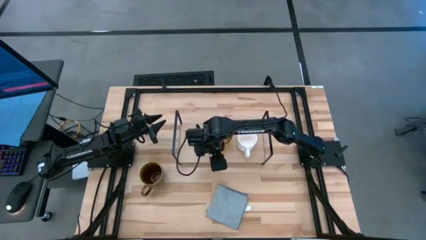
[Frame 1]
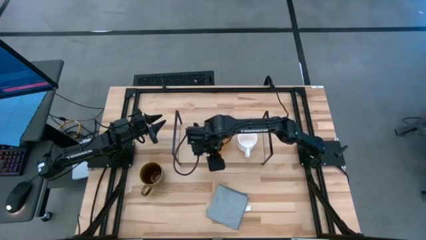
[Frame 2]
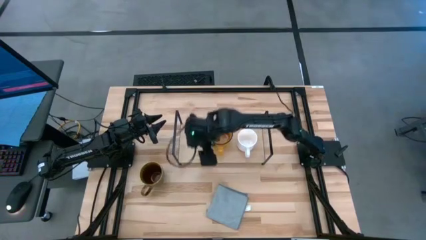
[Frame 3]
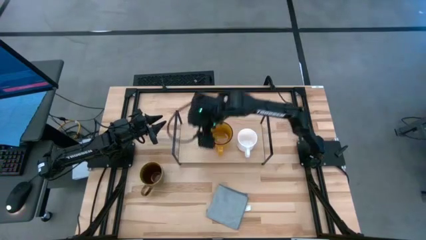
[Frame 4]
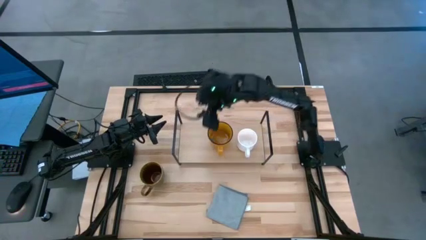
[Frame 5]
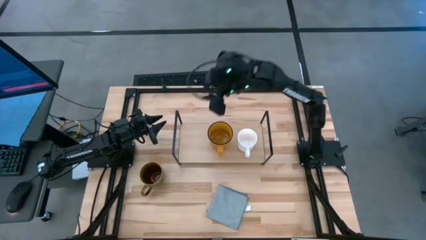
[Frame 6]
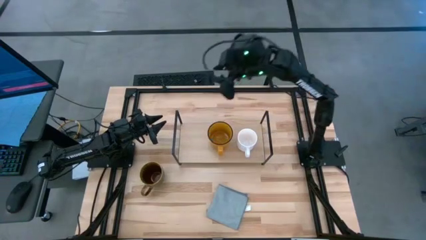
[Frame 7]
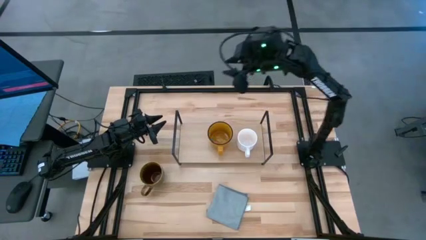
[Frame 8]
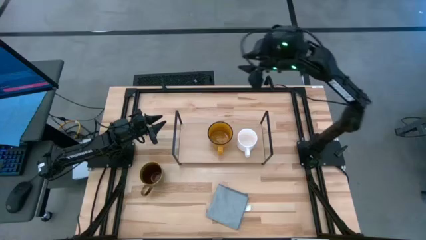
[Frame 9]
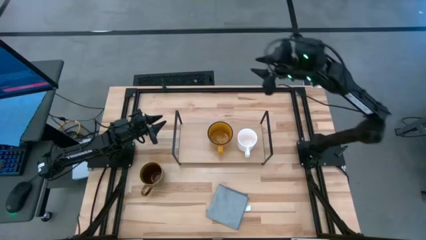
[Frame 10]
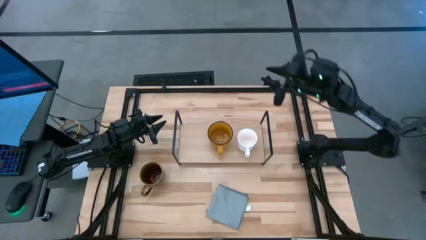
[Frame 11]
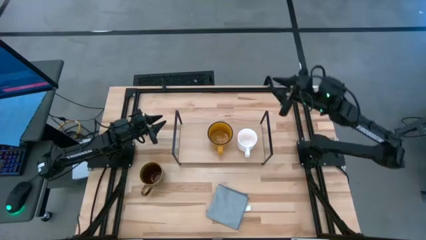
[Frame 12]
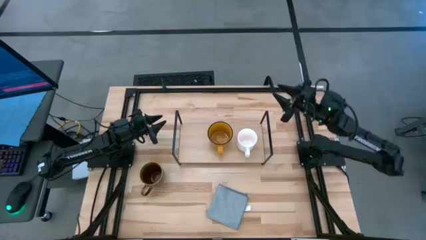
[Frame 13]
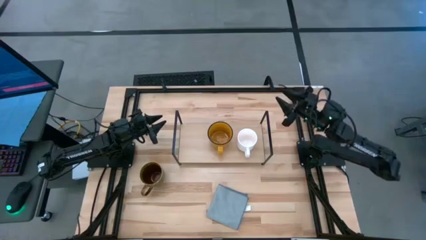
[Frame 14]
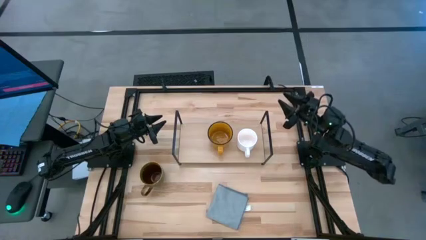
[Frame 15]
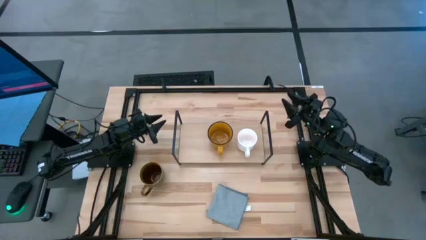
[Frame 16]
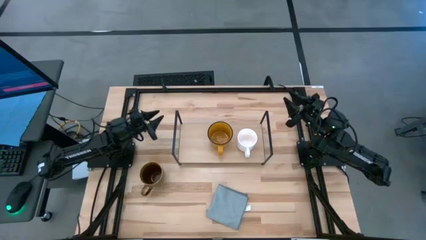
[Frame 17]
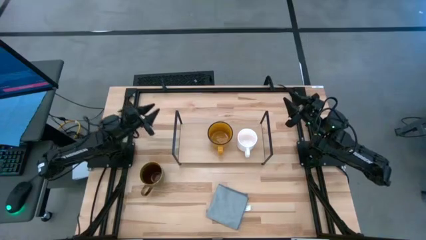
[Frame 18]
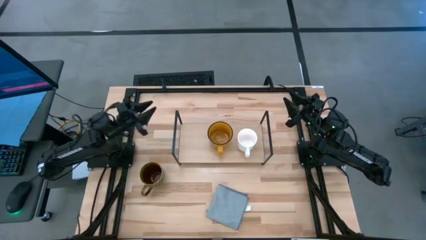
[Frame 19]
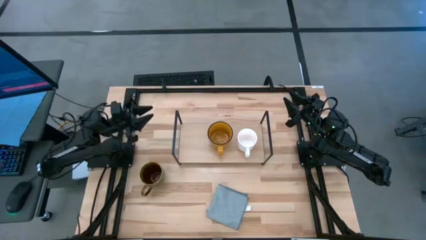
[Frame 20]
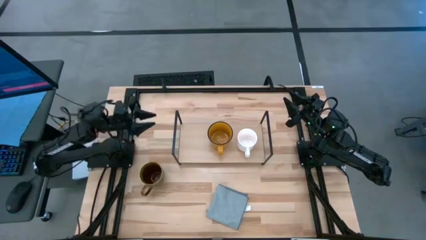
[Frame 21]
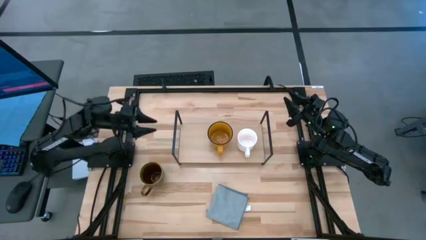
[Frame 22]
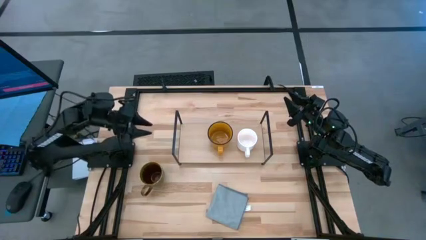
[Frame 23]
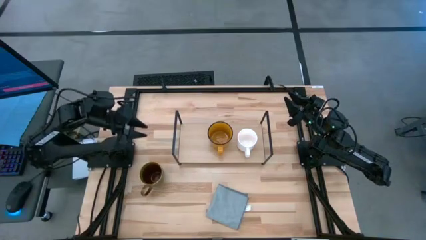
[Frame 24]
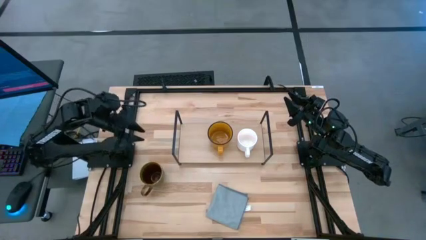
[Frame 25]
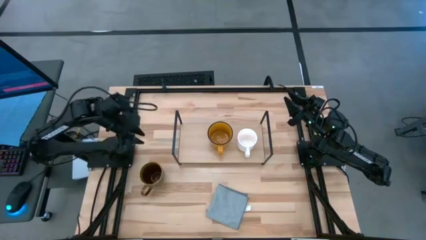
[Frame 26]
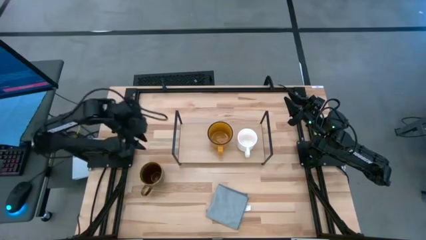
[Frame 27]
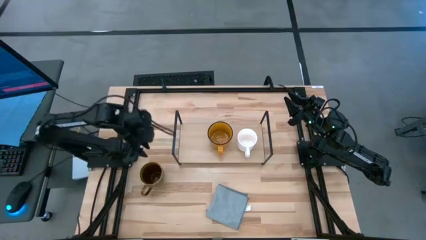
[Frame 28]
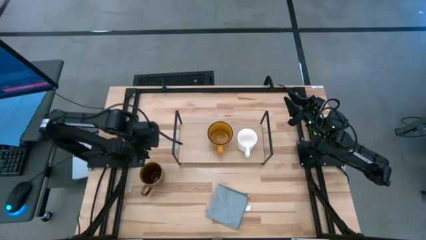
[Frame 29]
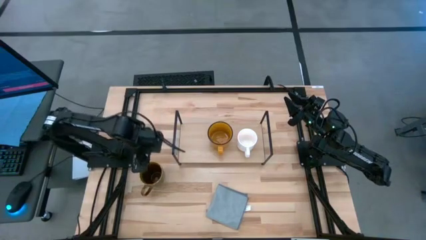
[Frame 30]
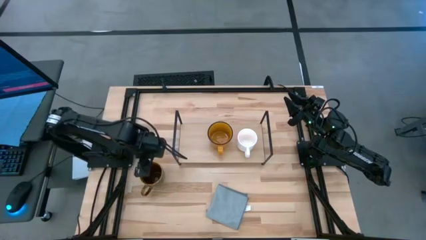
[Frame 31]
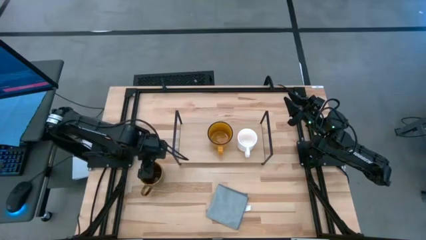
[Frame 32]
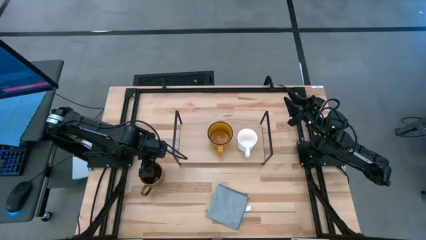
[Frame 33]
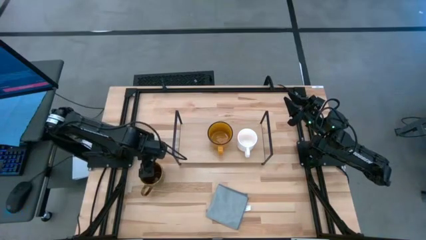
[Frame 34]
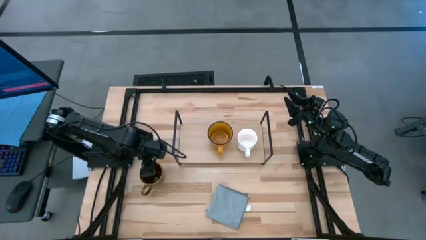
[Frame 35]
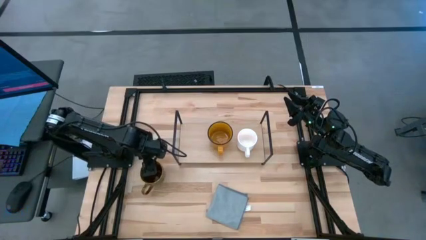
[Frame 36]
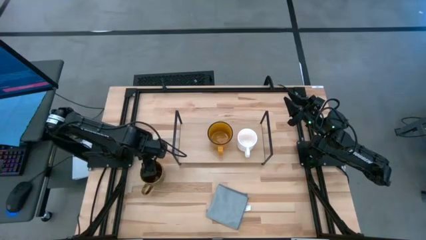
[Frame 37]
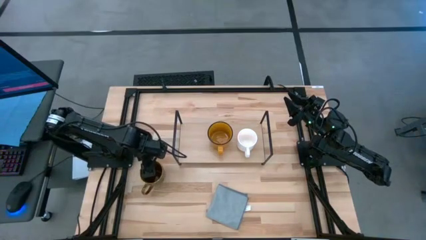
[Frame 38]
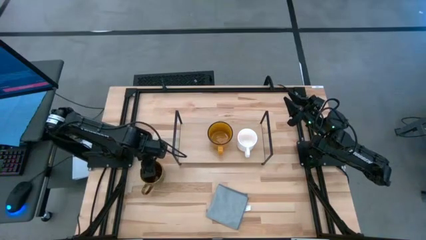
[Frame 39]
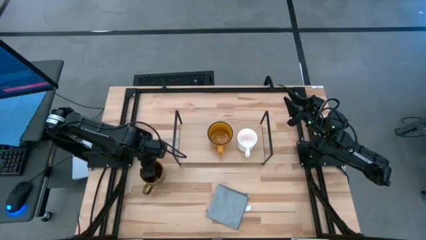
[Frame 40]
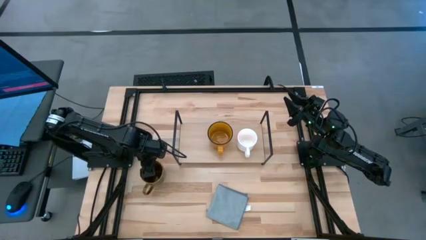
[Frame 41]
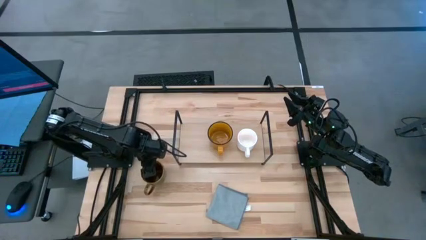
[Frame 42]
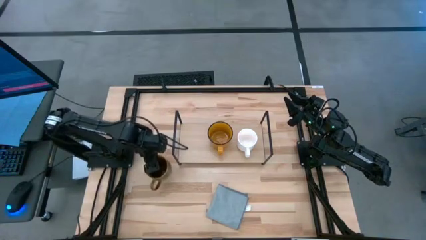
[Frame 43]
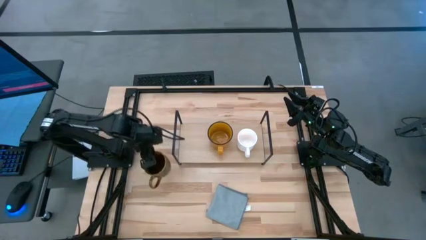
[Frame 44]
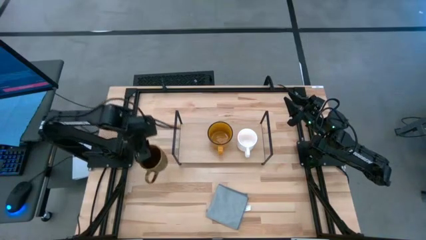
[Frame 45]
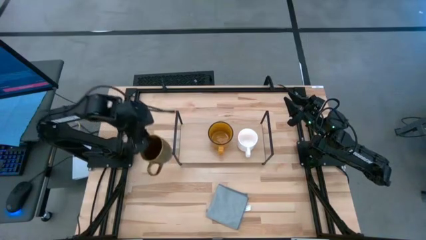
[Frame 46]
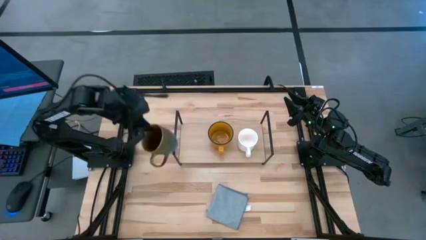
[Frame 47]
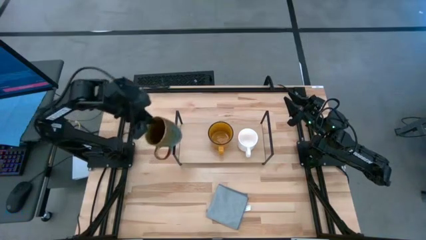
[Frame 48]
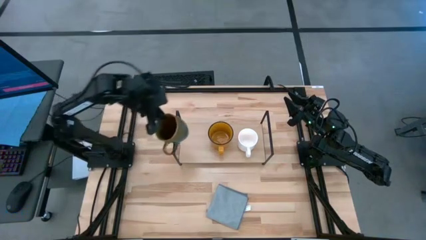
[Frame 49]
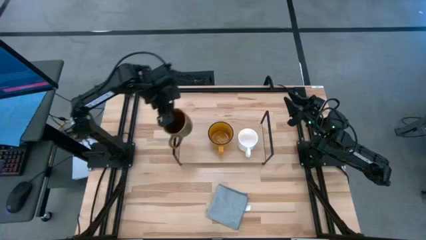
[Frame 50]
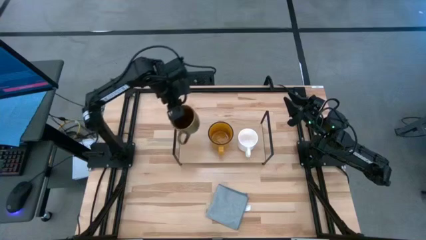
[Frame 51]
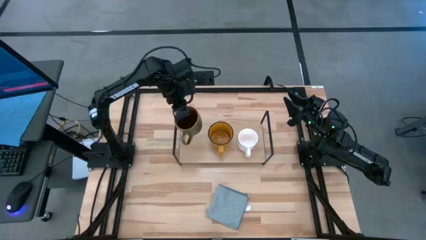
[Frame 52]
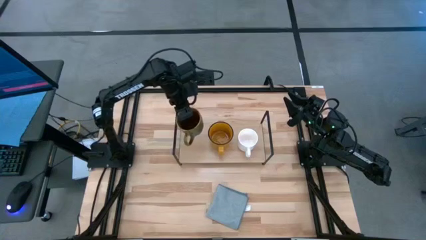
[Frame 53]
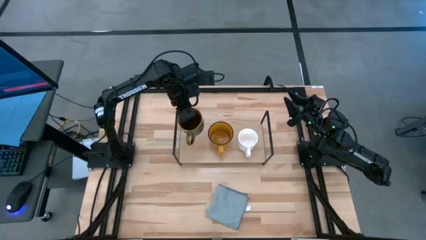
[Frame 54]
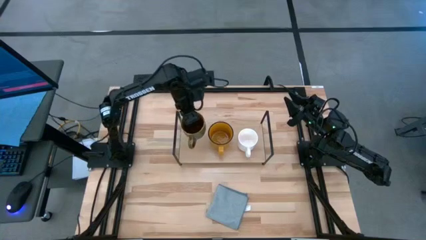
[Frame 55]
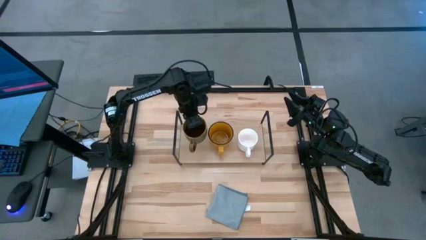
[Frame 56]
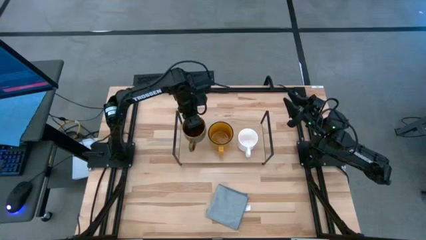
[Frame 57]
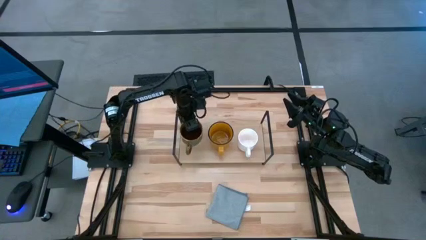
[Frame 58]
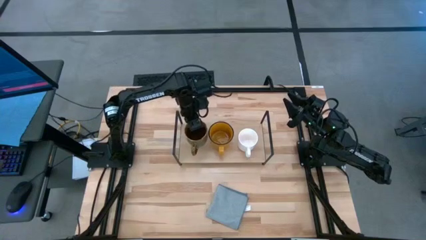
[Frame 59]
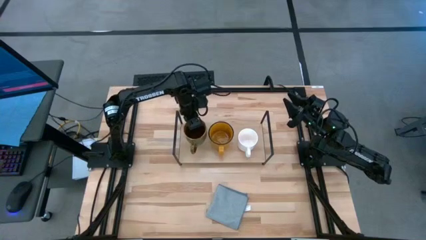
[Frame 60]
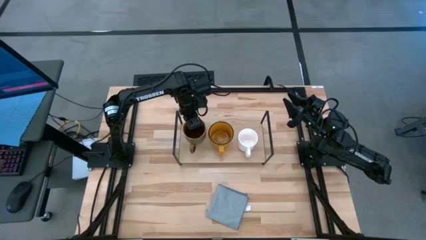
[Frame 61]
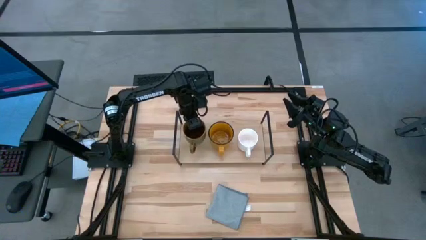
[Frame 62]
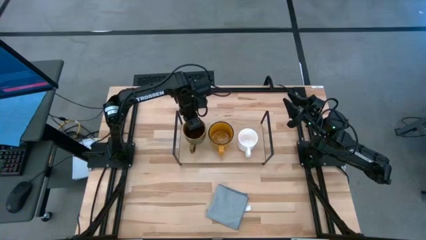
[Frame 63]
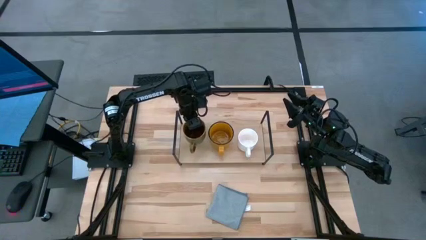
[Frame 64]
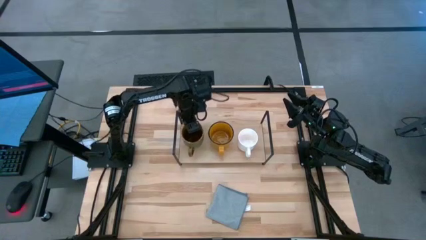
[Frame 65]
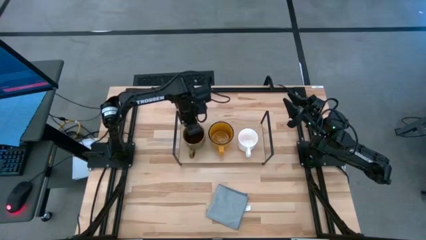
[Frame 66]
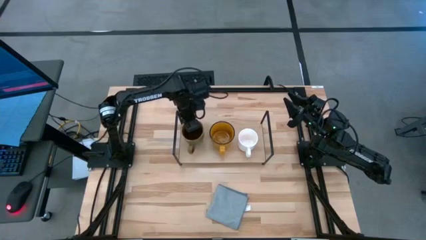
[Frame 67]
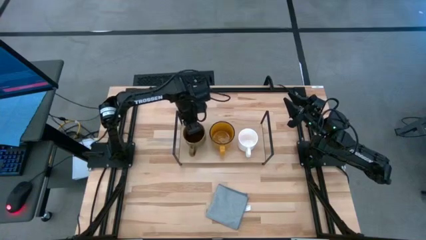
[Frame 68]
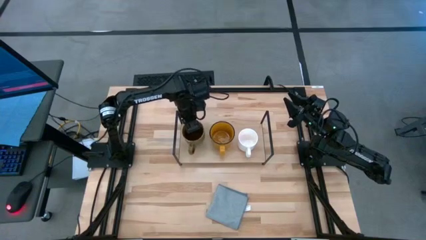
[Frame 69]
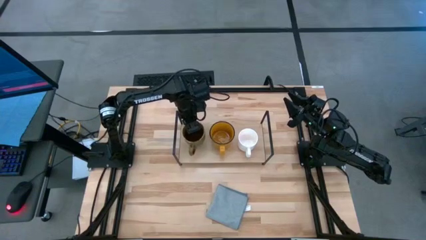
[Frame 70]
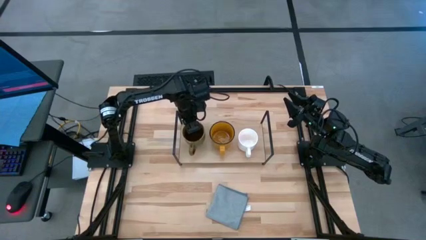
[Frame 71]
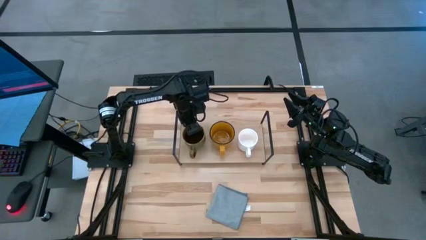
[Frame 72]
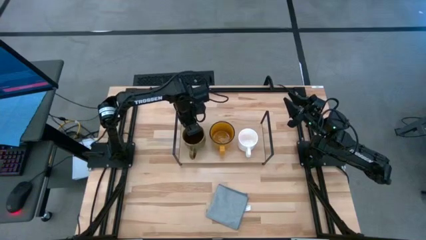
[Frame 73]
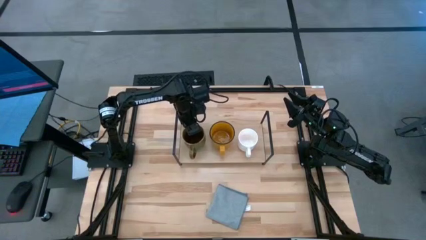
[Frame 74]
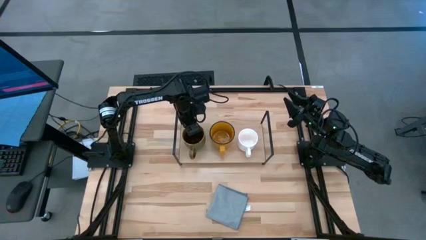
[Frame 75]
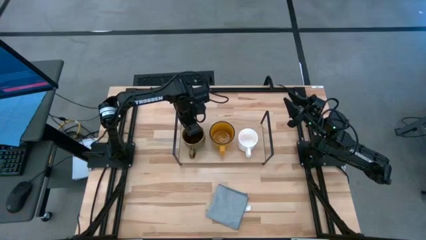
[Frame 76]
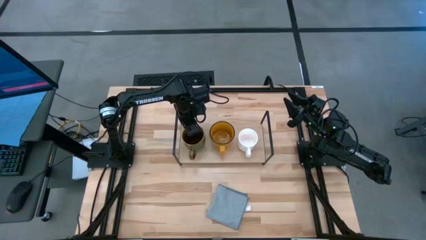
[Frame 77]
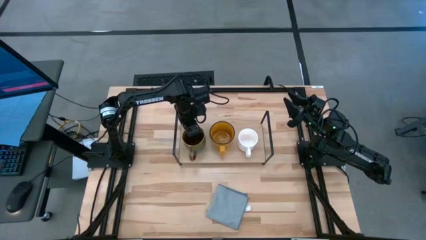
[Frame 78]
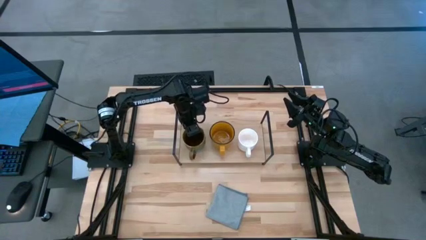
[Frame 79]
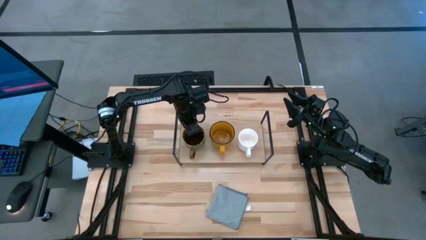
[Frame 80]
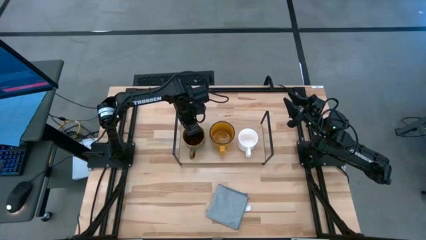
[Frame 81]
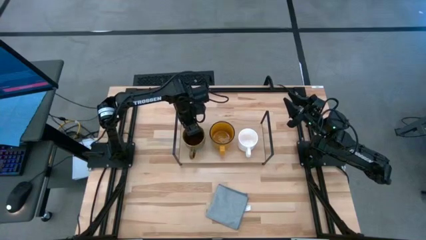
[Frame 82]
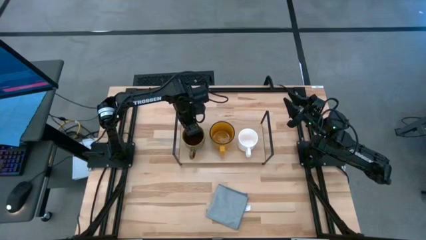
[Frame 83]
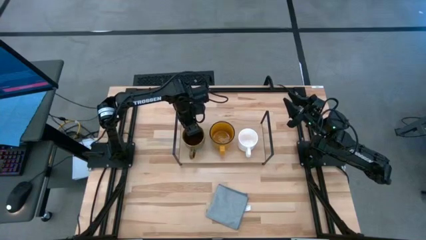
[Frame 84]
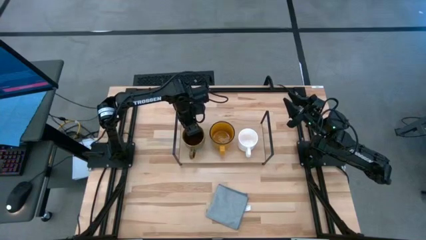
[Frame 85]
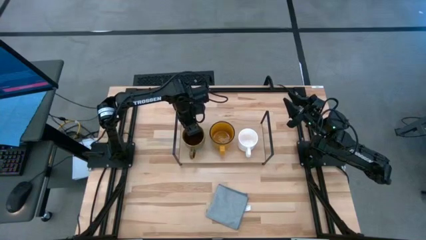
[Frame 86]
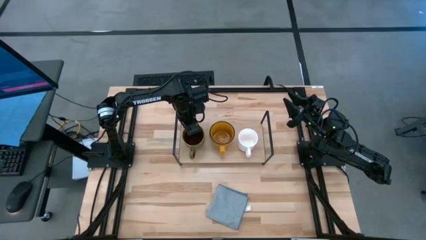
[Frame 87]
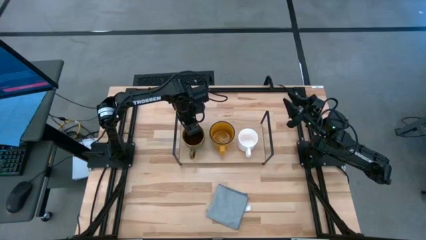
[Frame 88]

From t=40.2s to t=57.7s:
Task: Stack small to large cups/mugs on shelf
Put the brown cup on the shelf
